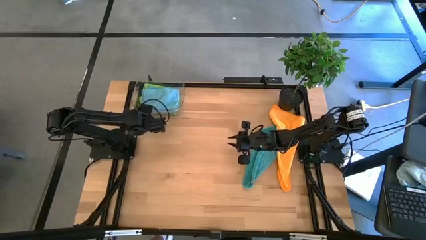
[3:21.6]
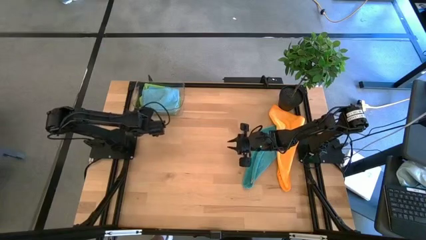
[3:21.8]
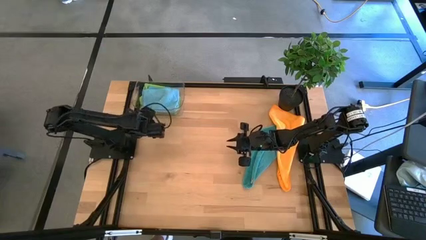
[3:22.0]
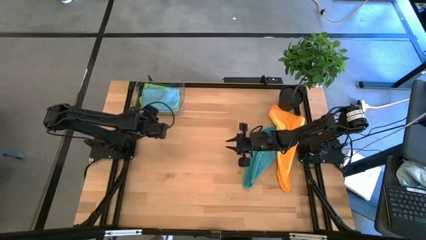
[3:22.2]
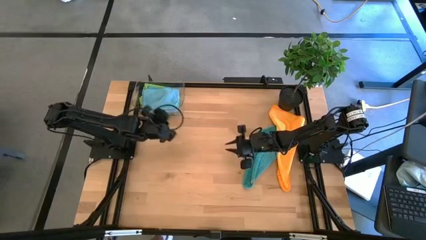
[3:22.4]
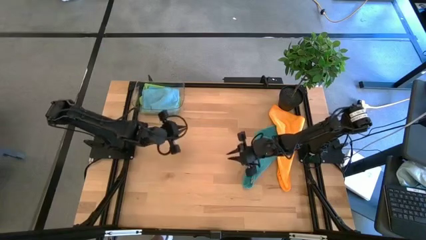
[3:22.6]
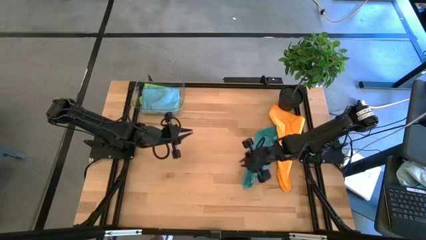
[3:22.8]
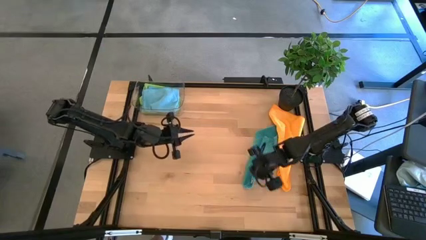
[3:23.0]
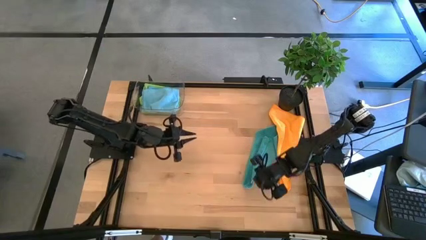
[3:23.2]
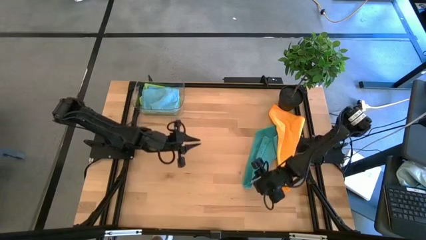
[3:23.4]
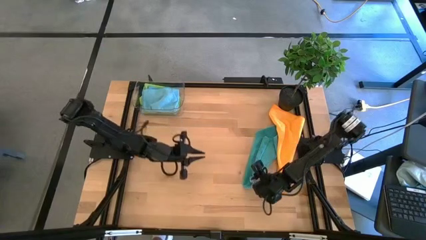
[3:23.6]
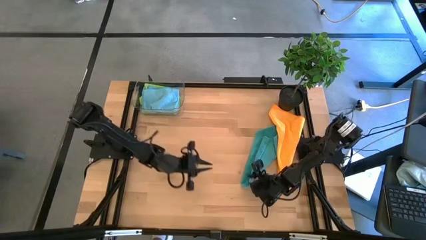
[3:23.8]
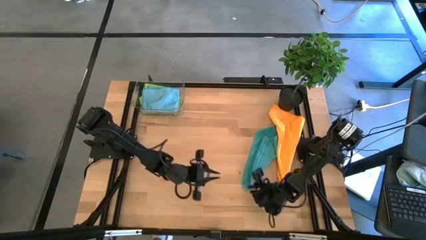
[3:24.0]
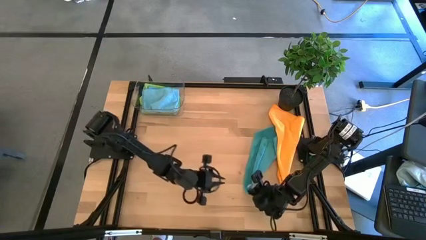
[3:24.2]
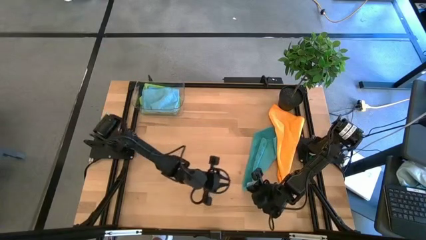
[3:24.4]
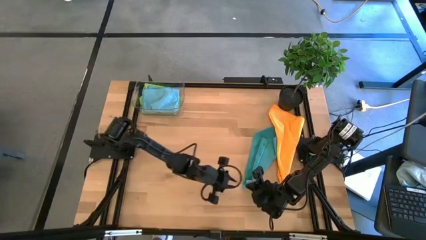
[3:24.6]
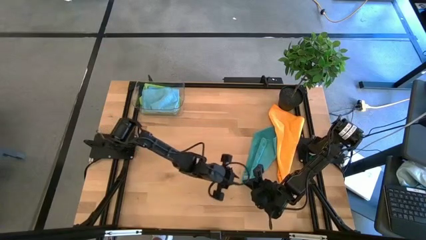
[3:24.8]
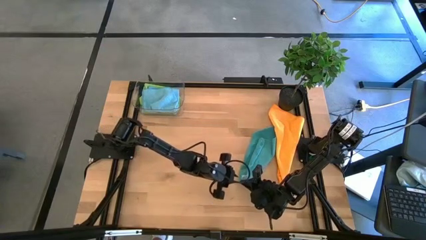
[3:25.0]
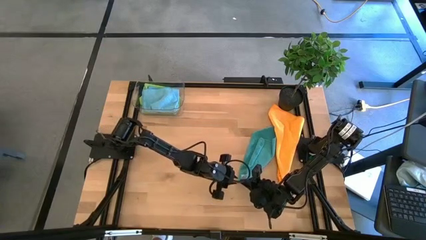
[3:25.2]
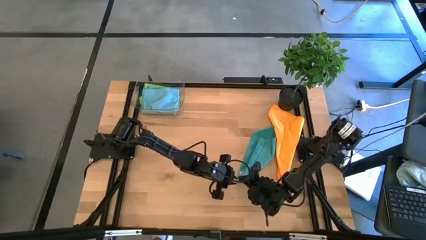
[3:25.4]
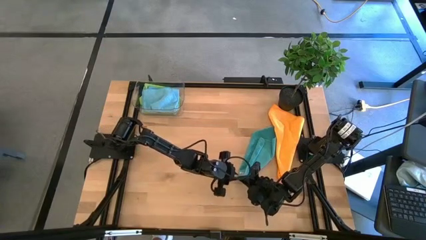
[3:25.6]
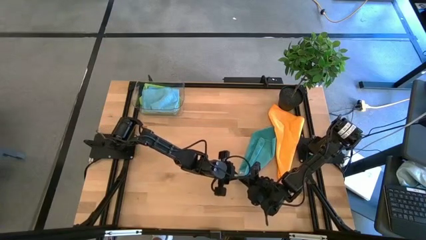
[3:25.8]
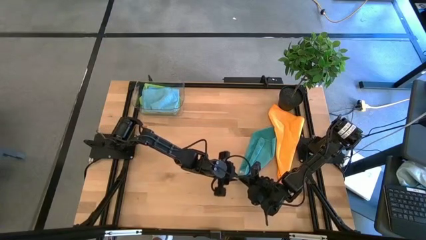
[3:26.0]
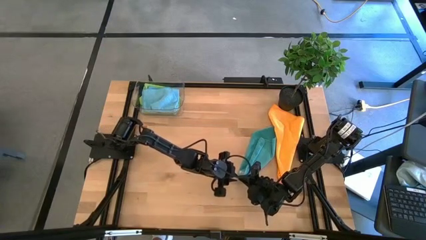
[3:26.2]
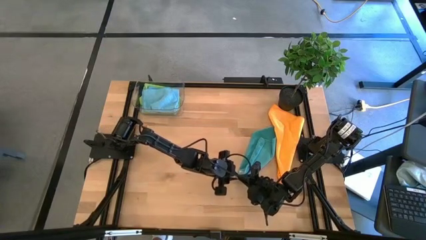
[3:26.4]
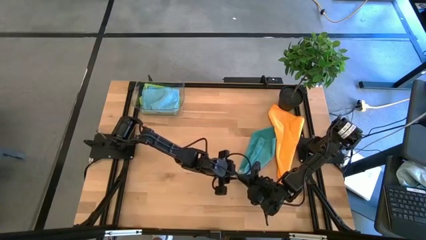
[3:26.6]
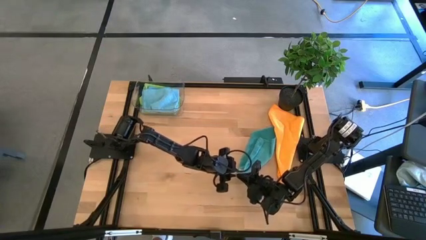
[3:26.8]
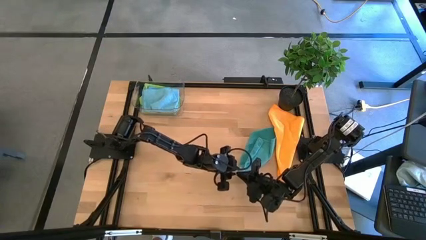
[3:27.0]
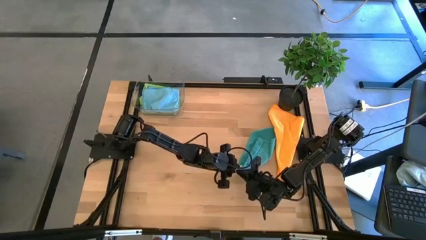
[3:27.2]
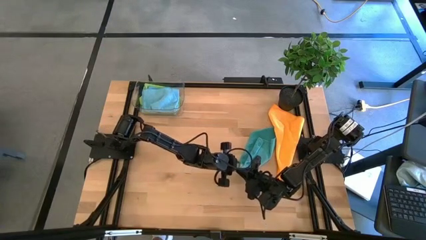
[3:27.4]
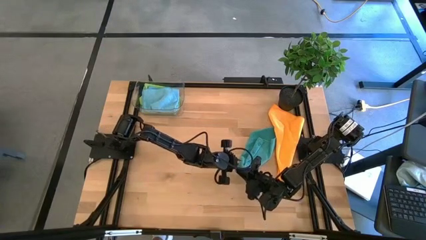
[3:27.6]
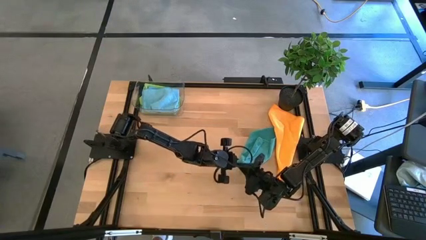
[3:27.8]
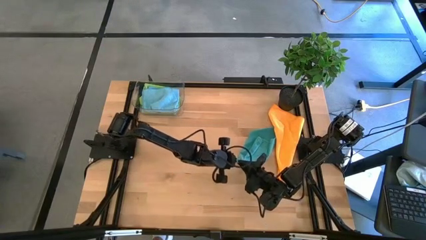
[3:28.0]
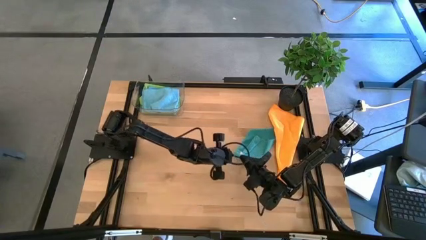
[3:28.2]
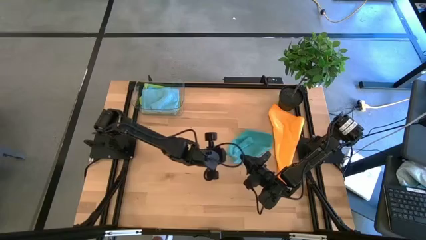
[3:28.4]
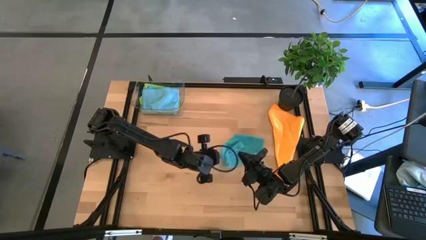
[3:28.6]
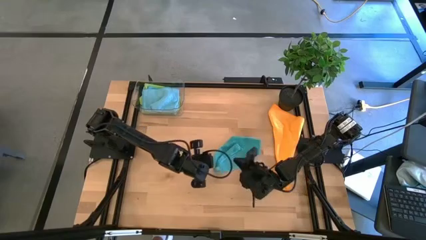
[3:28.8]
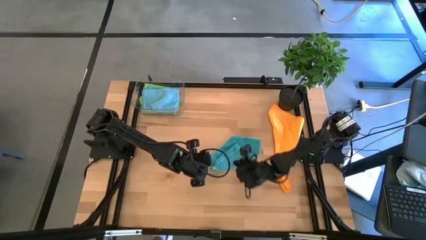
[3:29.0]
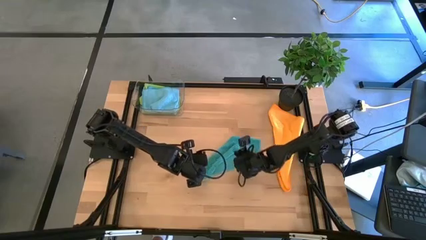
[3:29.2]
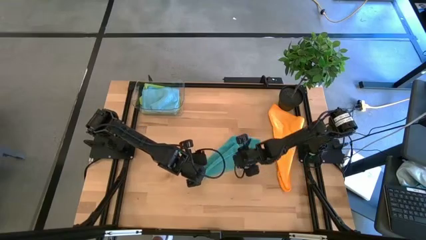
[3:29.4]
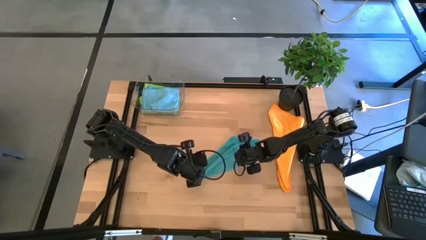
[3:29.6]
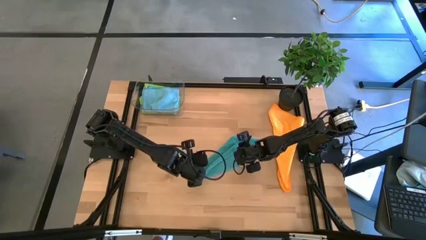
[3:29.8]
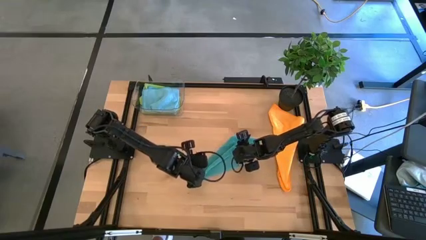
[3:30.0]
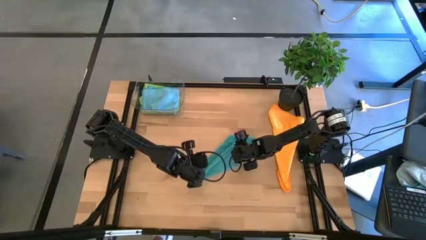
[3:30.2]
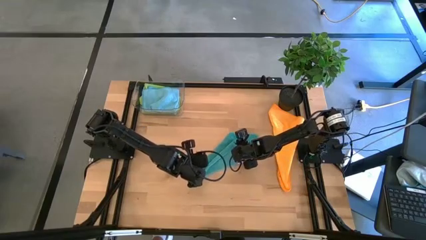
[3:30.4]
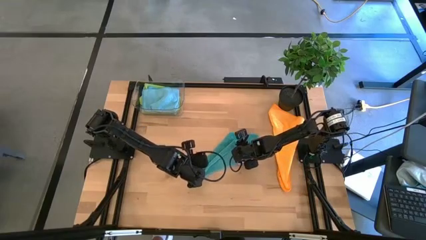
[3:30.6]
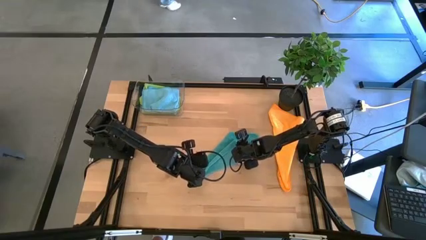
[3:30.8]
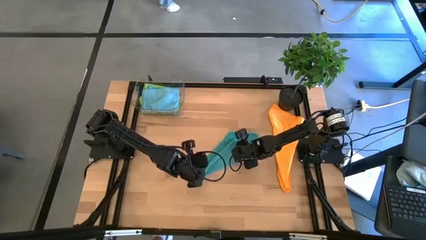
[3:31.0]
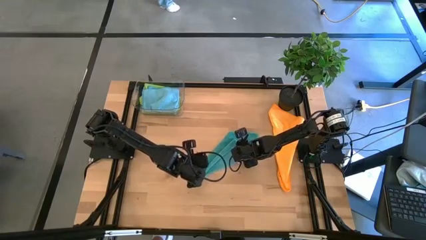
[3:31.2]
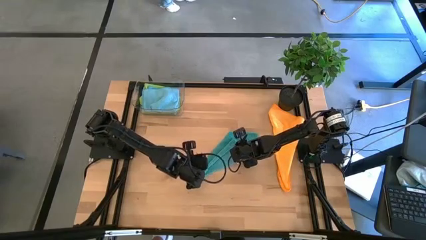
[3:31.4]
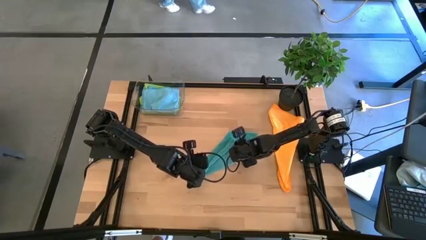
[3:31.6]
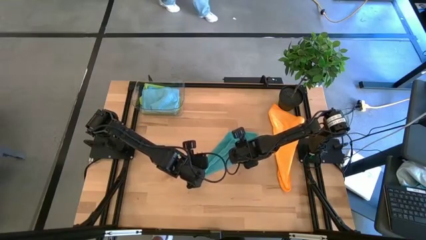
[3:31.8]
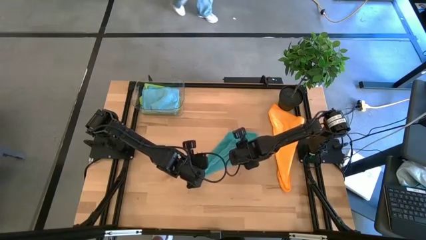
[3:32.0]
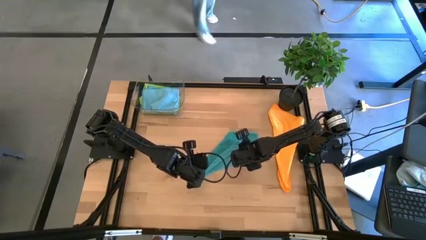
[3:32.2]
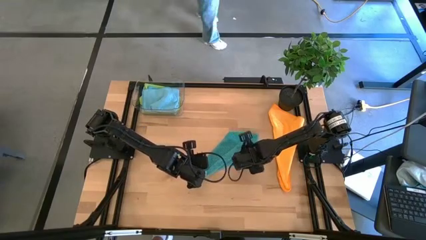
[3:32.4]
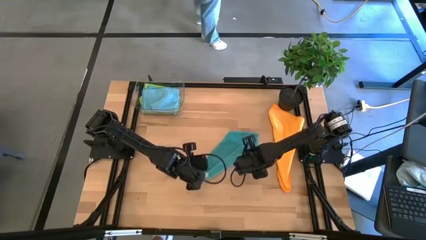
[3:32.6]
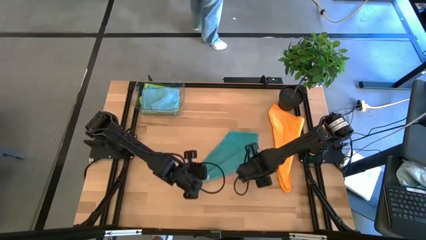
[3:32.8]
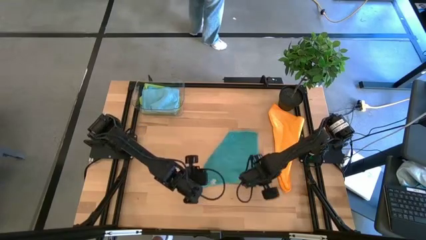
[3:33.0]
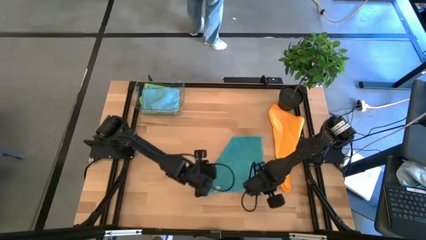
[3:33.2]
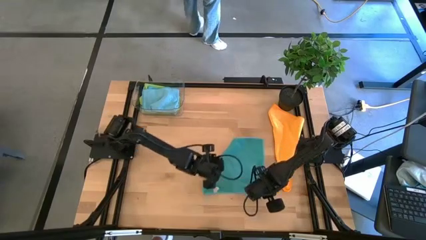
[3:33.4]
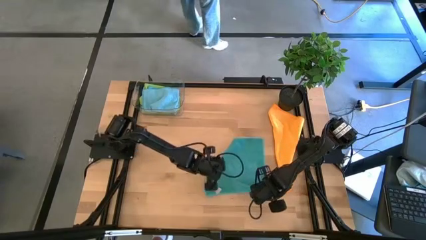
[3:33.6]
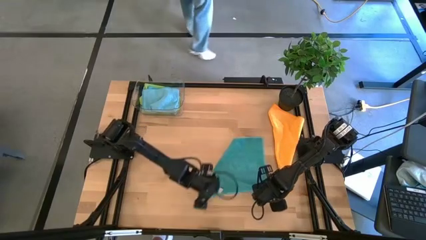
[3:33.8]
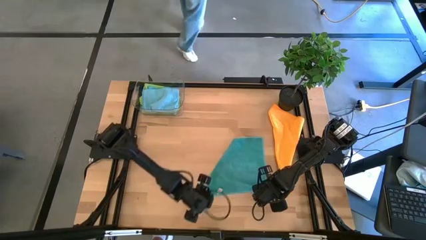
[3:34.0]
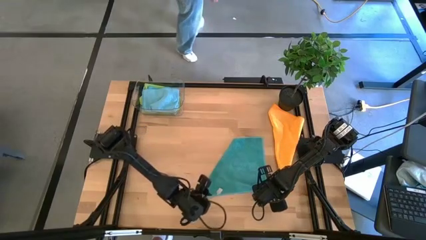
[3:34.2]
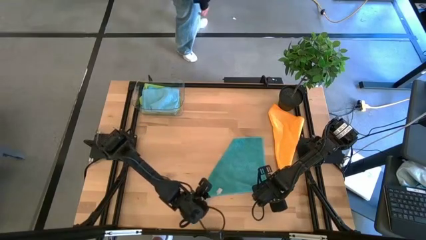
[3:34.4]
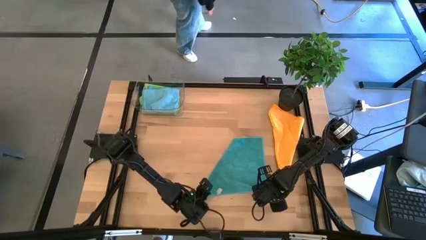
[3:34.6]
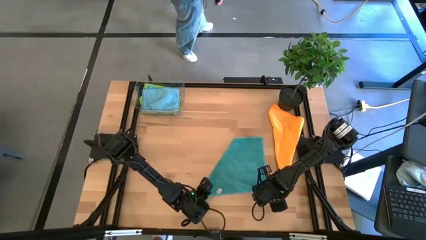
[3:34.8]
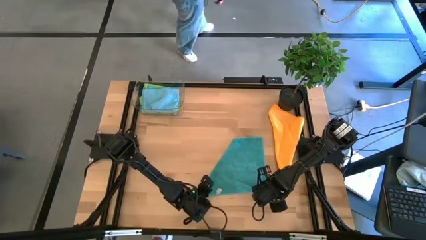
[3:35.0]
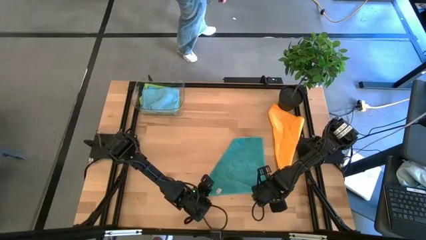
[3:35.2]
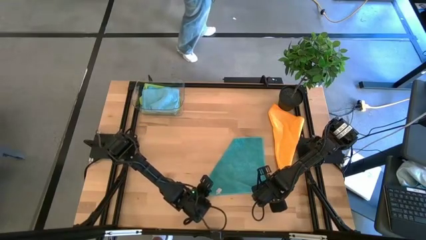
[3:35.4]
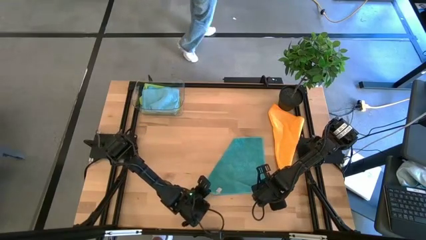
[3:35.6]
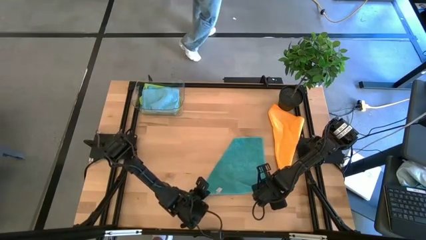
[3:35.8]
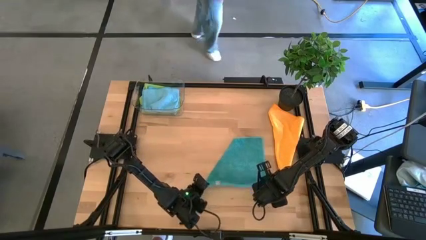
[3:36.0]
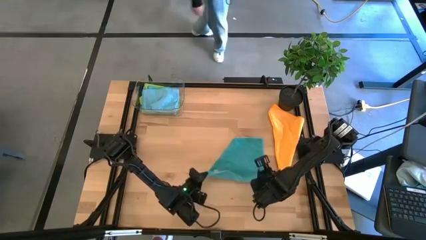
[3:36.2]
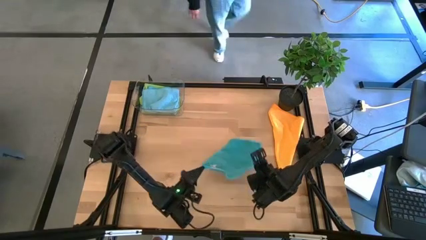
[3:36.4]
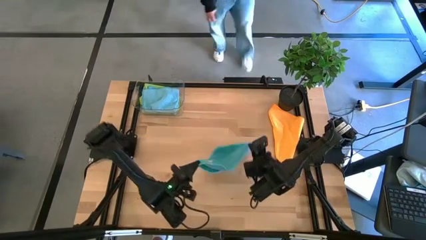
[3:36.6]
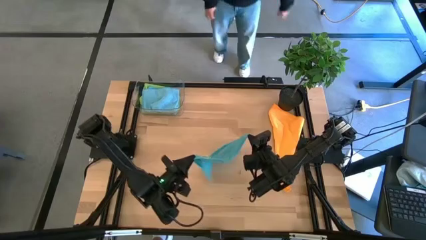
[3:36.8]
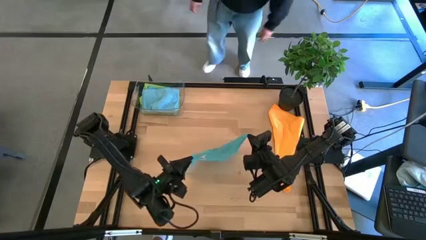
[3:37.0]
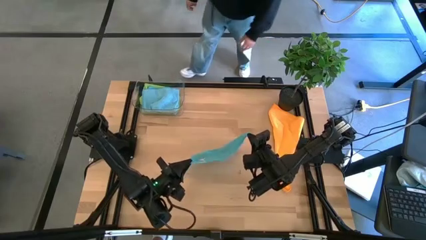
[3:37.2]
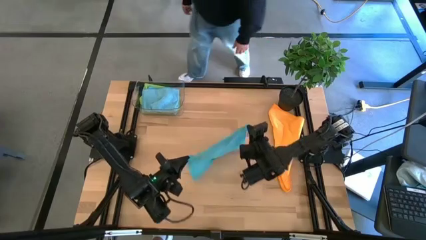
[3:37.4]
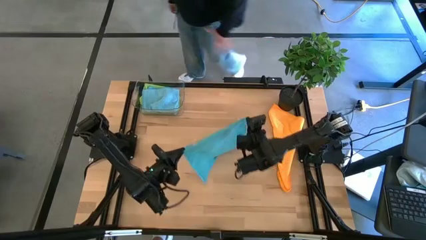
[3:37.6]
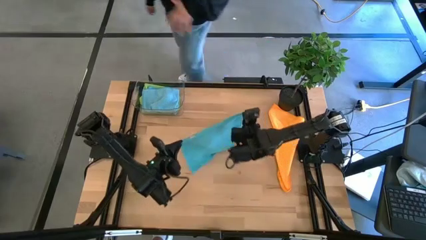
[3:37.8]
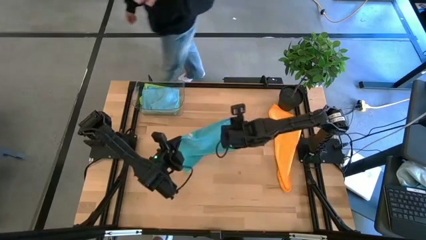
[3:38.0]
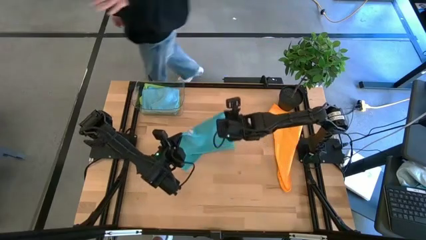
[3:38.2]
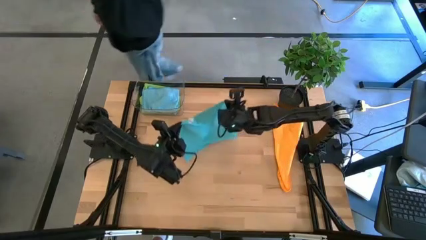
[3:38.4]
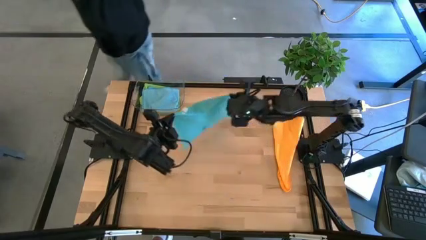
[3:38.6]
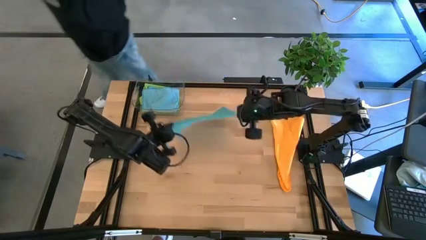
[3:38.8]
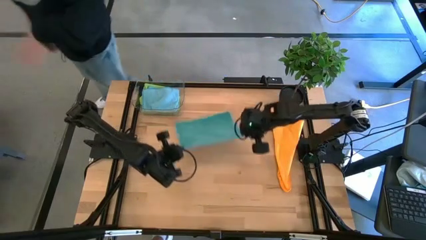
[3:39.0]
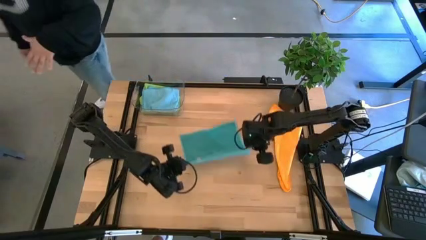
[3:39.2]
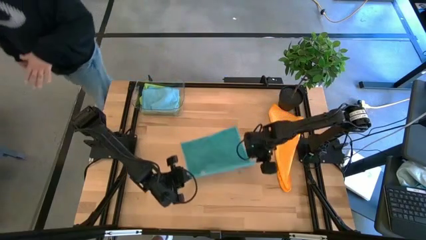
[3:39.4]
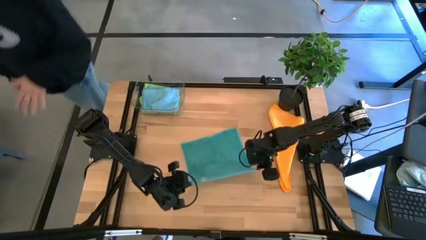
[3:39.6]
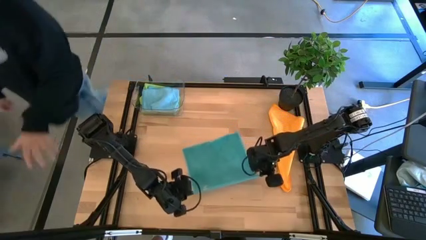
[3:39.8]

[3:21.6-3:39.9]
Task: Fold microfiber towels
Fold the blue microfiber cloth
